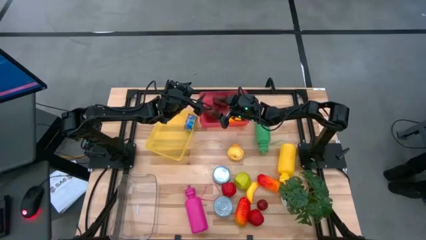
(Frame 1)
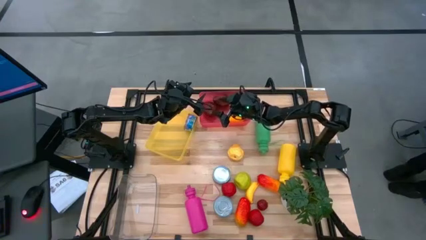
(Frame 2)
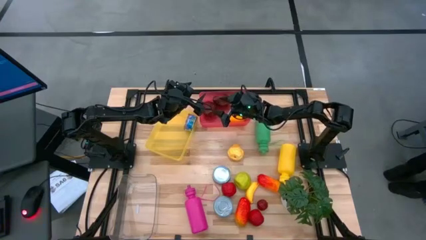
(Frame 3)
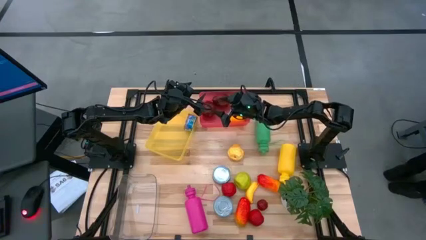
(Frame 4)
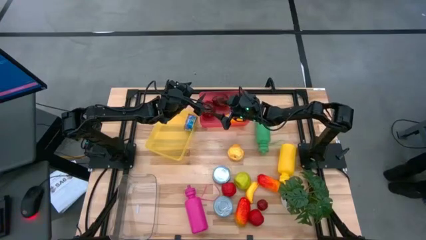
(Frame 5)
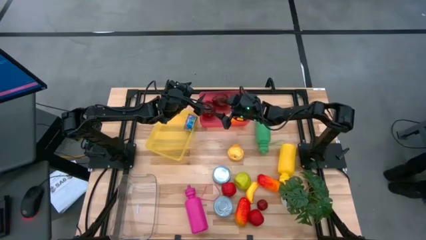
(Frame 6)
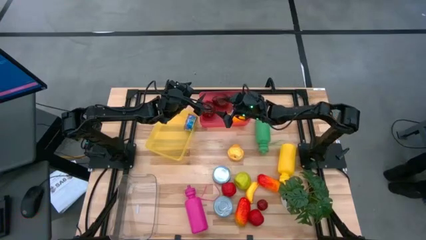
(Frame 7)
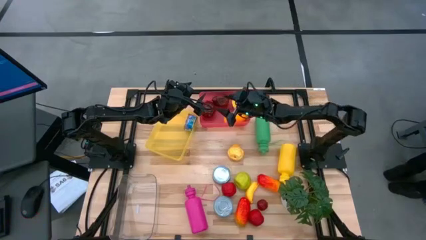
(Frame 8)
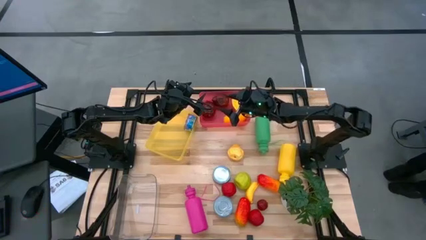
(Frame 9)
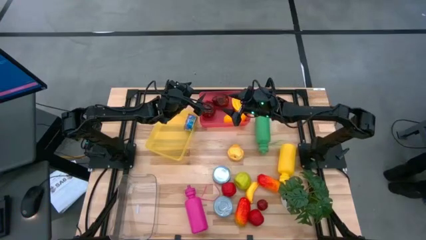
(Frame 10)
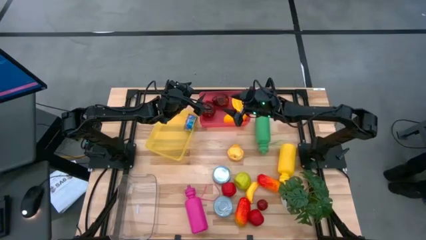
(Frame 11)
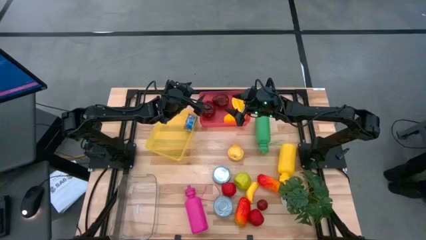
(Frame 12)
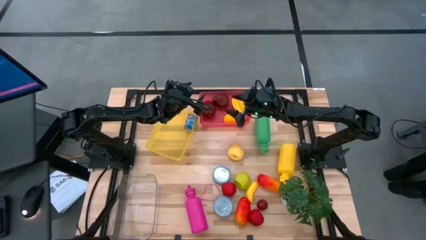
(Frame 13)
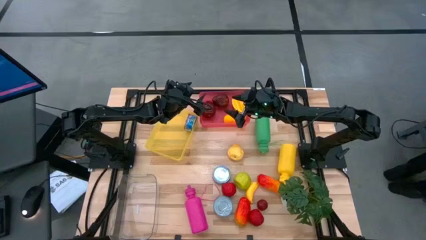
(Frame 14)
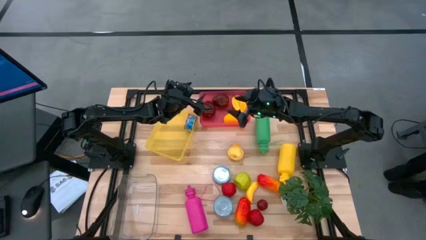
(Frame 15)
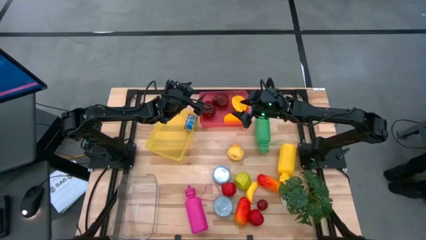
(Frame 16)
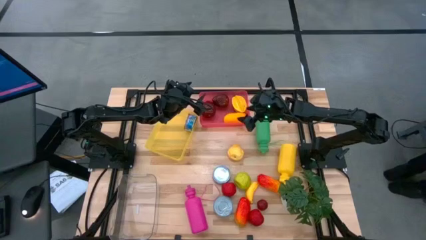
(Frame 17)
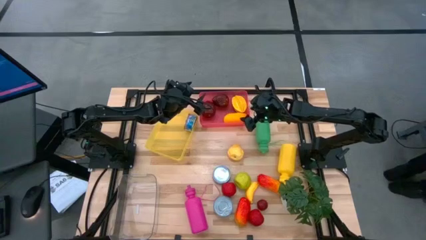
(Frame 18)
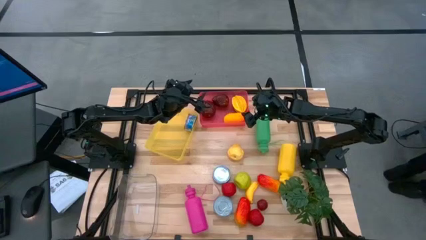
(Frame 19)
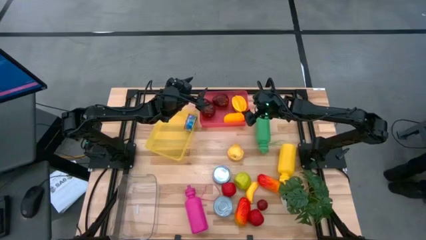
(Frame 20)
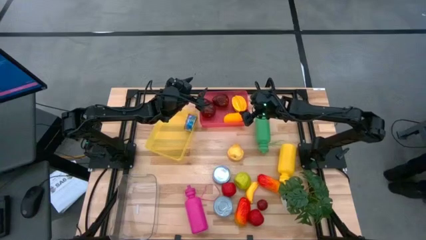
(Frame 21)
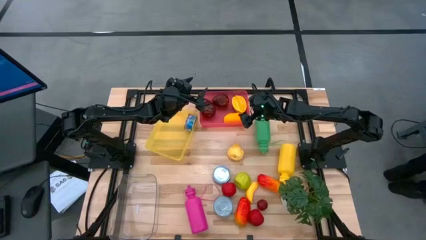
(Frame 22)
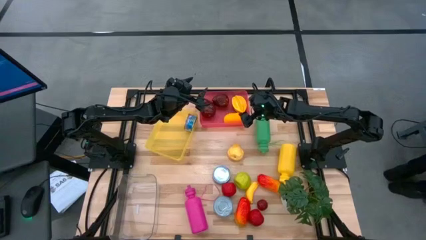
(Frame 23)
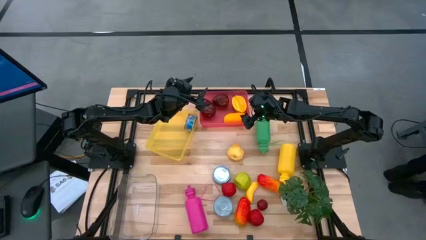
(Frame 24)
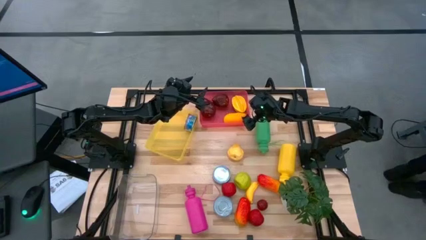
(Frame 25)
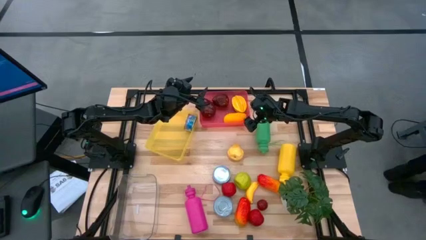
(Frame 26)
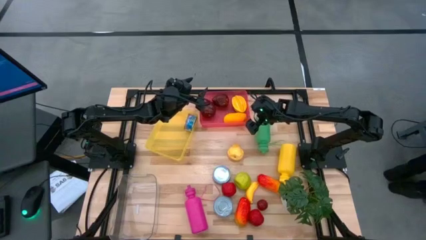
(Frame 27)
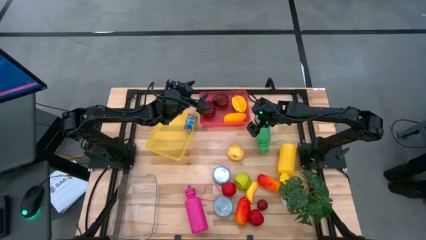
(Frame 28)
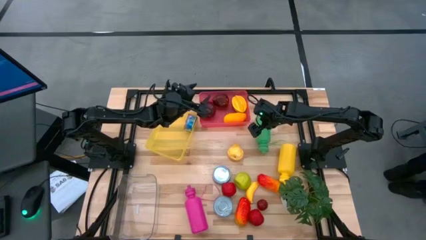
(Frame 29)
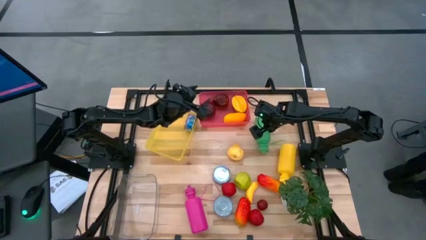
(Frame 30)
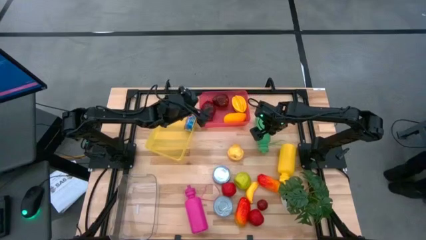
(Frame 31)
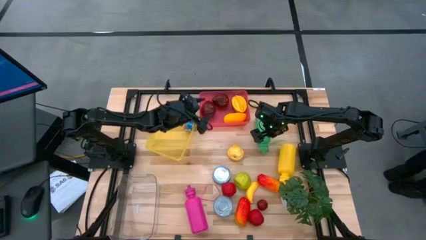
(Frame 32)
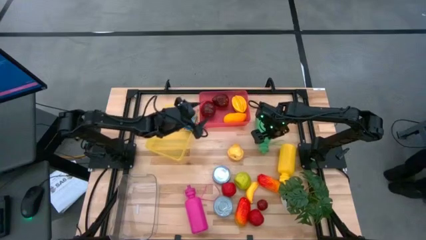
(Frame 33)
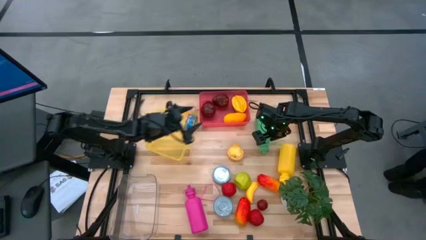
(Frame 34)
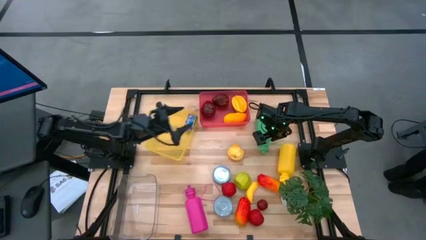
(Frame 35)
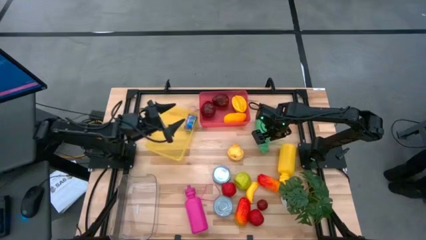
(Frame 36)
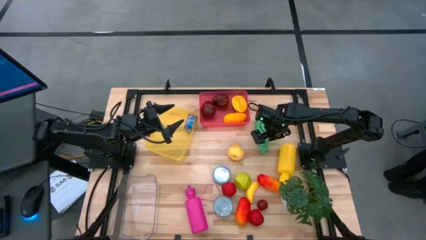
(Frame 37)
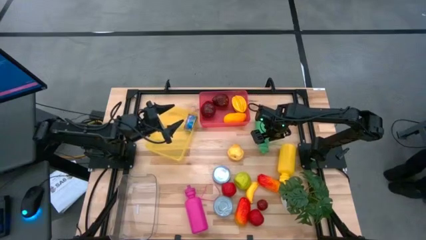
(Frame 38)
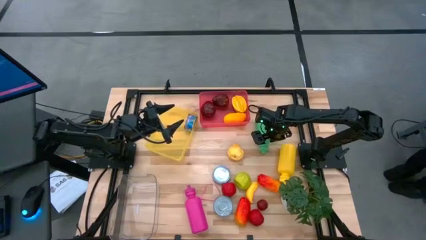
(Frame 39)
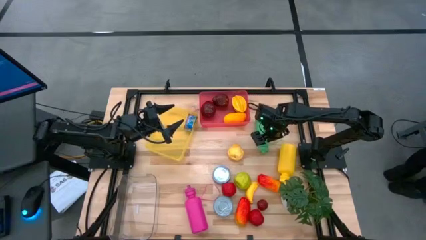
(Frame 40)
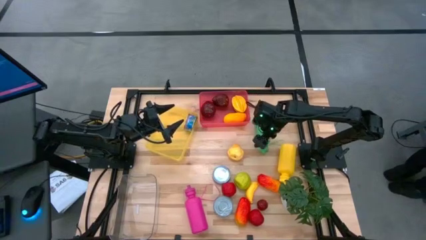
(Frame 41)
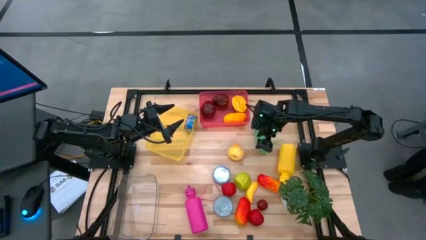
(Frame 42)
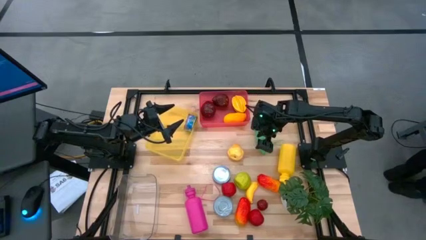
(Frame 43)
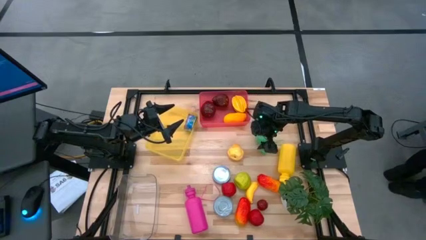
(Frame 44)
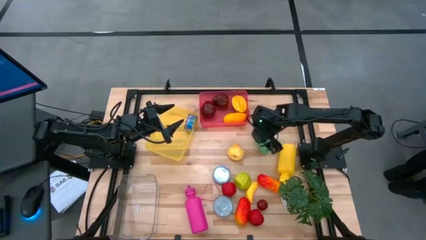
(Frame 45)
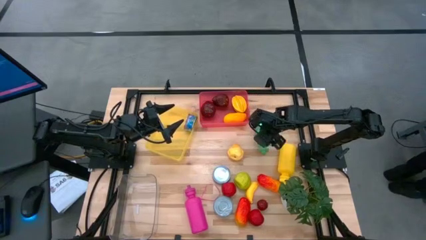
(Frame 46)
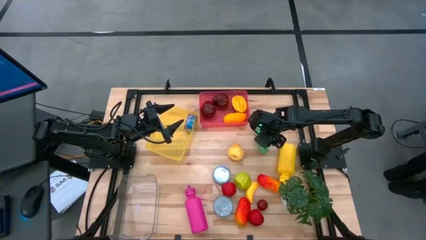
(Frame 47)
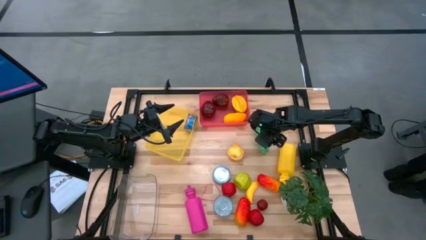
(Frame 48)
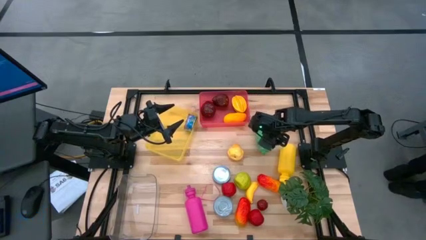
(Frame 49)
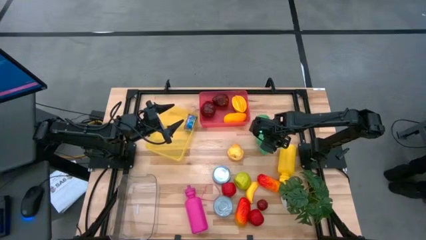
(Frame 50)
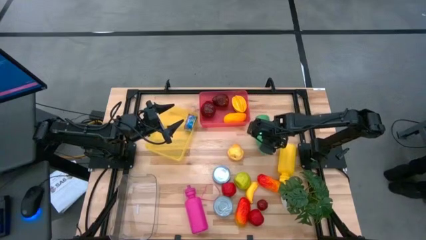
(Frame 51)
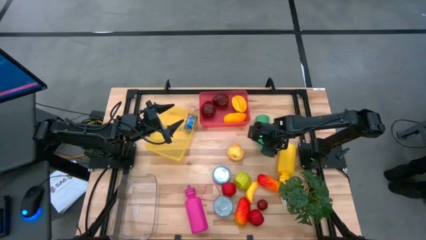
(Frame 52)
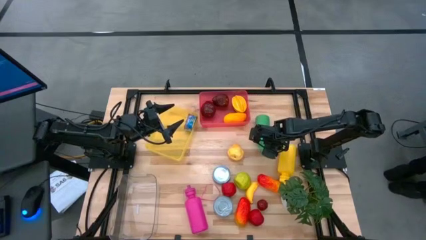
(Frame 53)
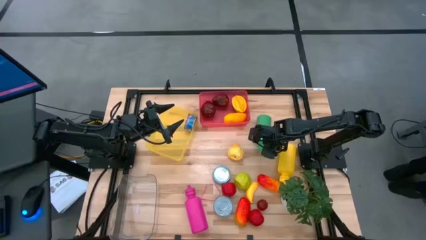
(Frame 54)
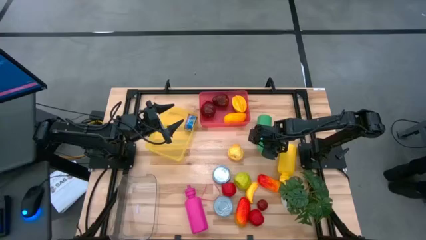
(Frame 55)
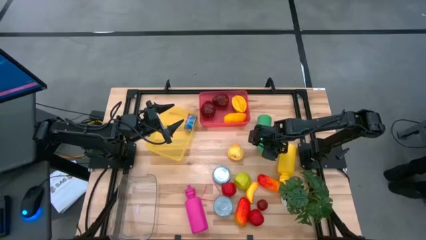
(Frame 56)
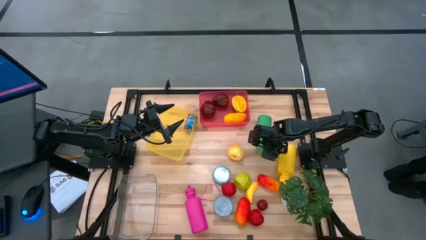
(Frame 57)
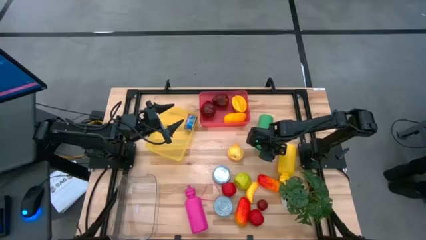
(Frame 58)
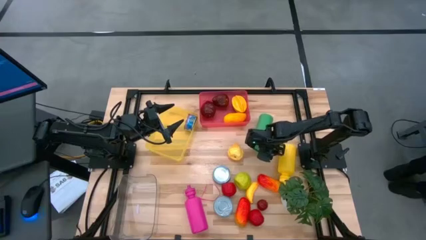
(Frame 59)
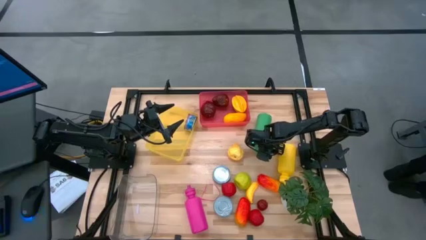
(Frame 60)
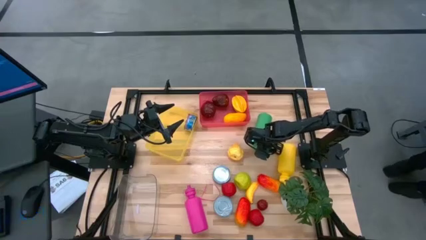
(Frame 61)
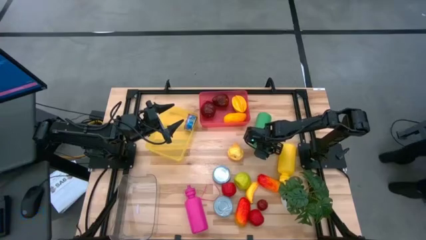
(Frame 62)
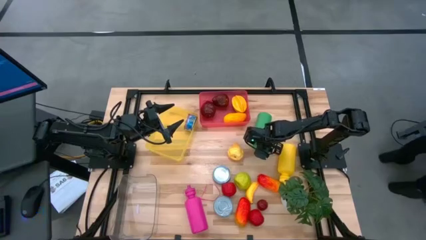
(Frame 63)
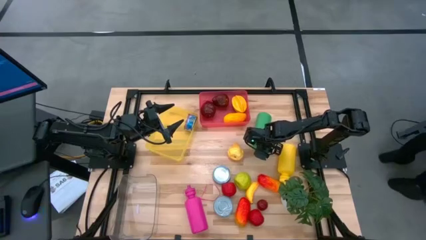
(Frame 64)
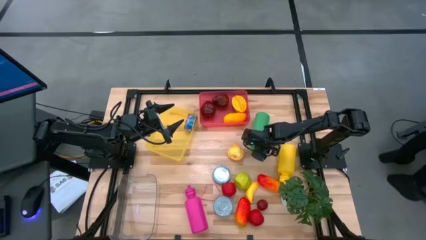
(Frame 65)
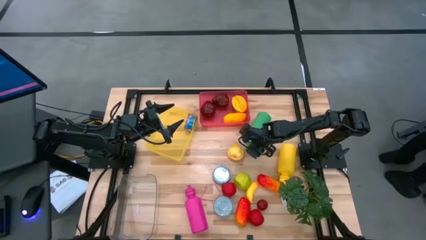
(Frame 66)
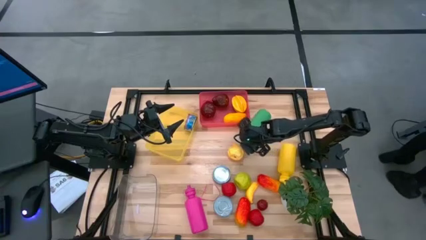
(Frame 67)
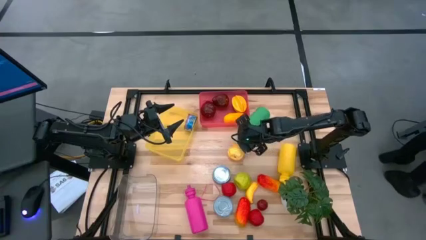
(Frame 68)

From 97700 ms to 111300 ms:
Task: Pick & Place Food Item
Put the green water bottle into the transparent bin
